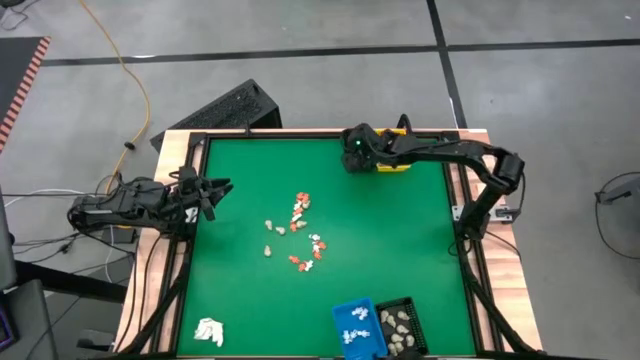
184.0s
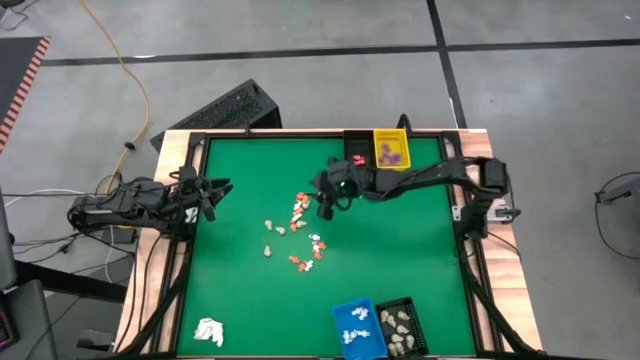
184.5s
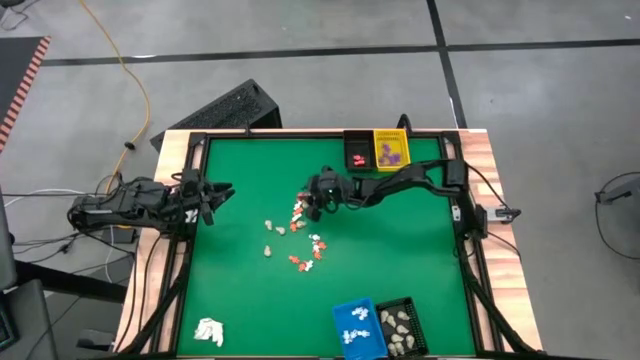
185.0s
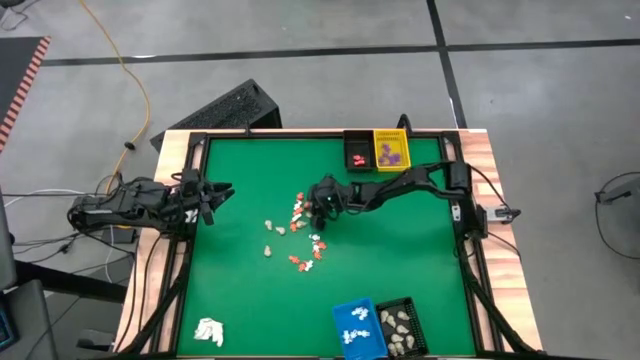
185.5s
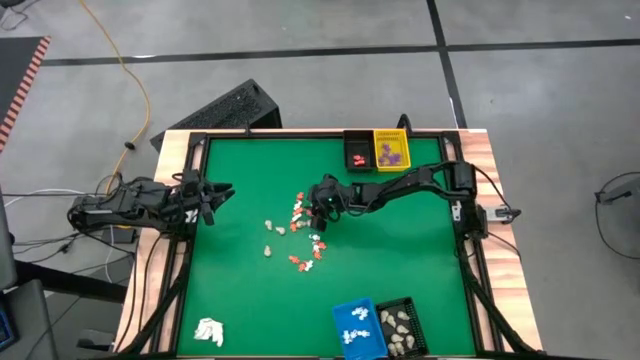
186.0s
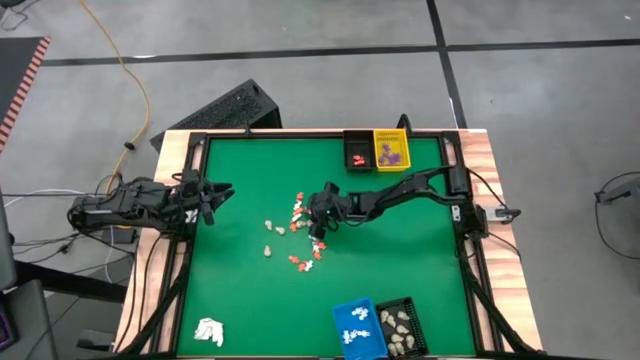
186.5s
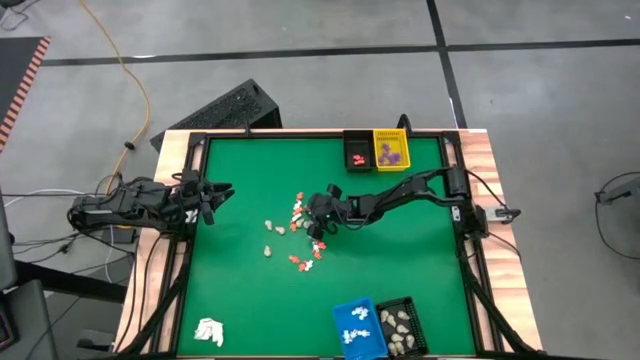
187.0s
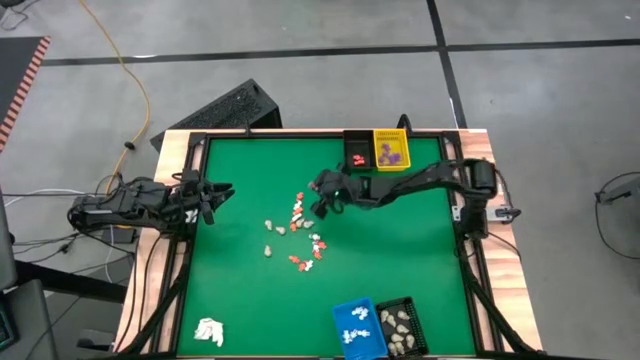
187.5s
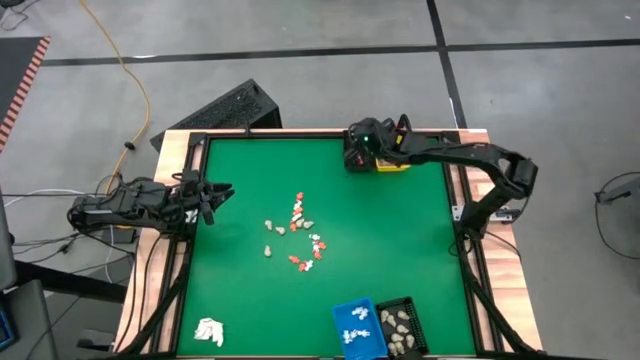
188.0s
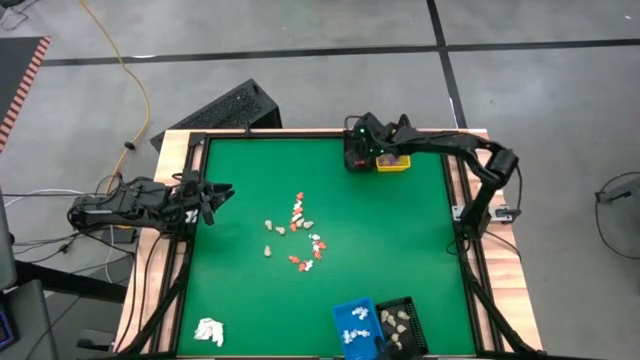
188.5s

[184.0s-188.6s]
Task: Sort Halloween decoration
Put the orange skeleton toy into the top black basket

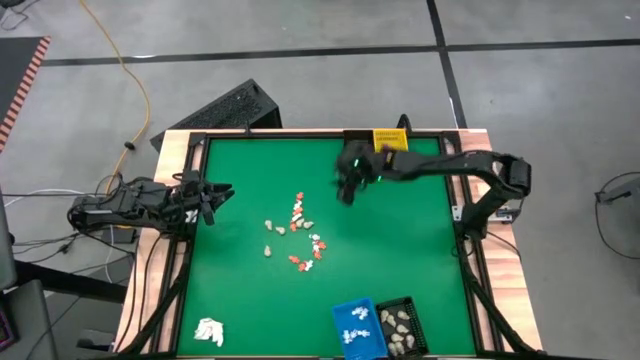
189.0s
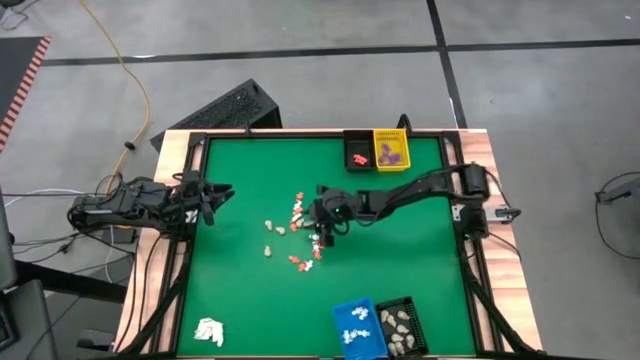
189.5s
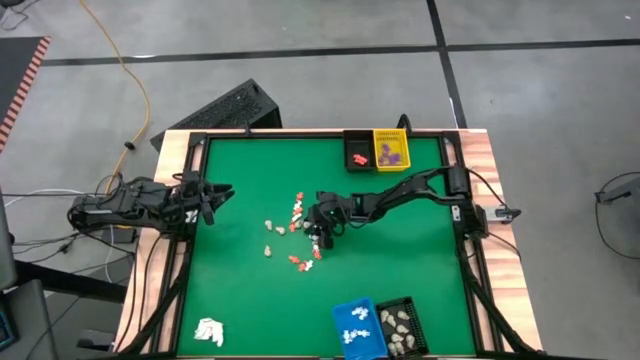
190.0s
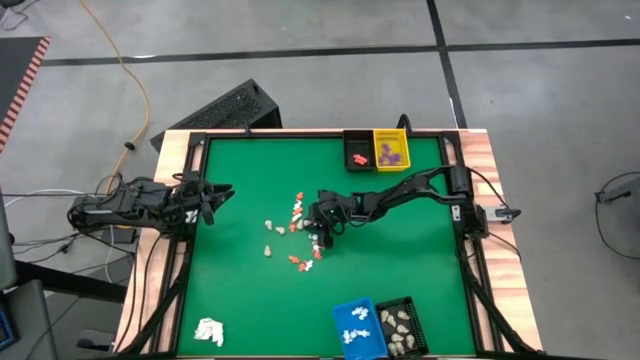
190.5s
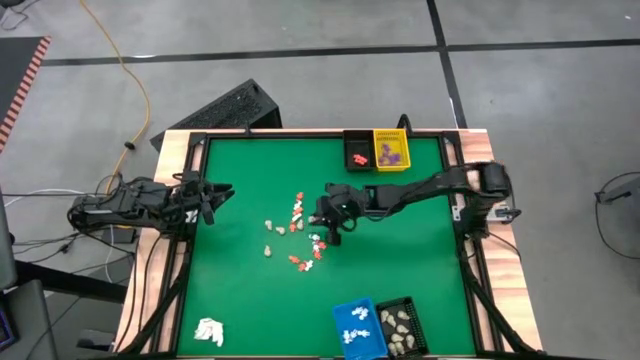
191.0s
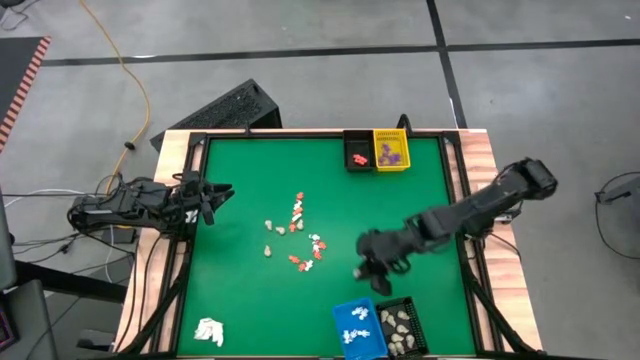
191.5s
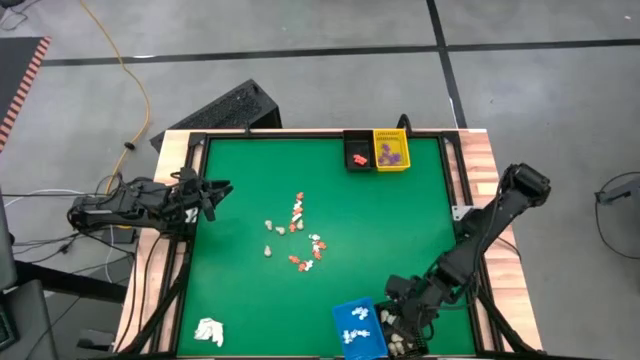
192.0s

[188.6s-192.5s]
Put the white skull toy into the bottom black basket

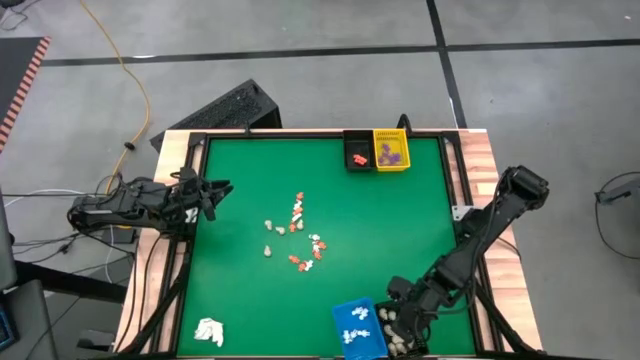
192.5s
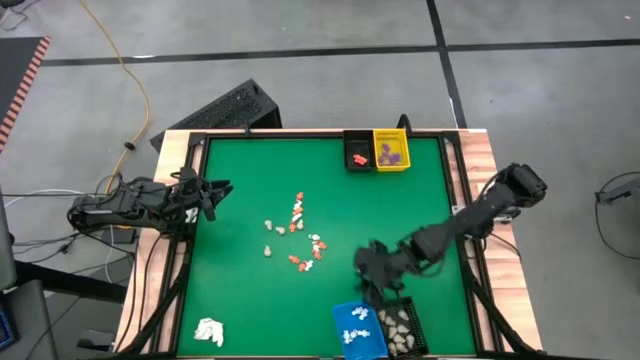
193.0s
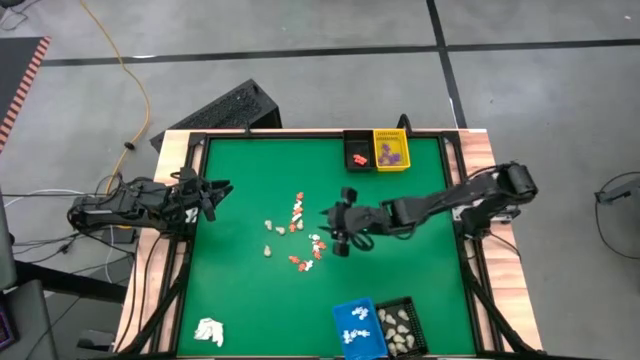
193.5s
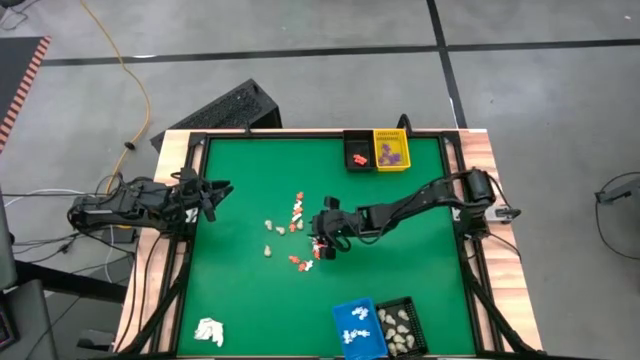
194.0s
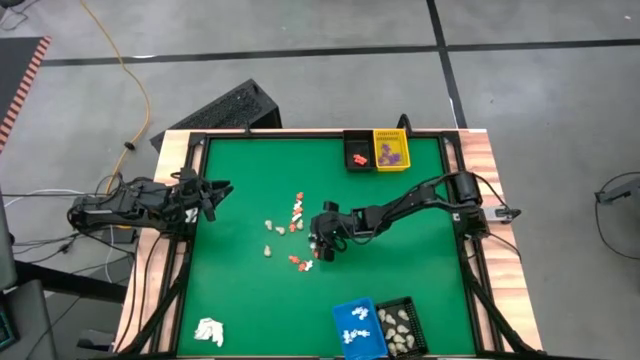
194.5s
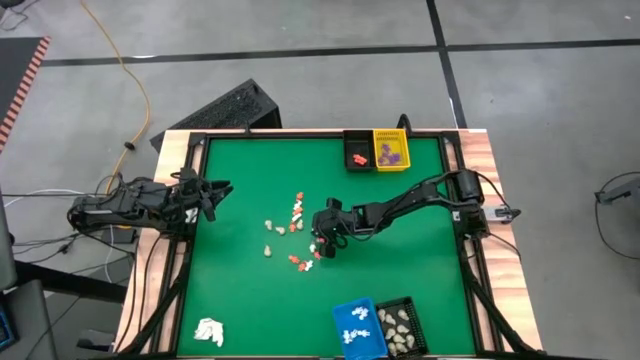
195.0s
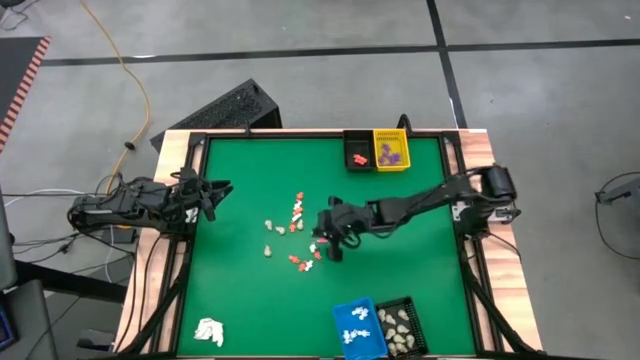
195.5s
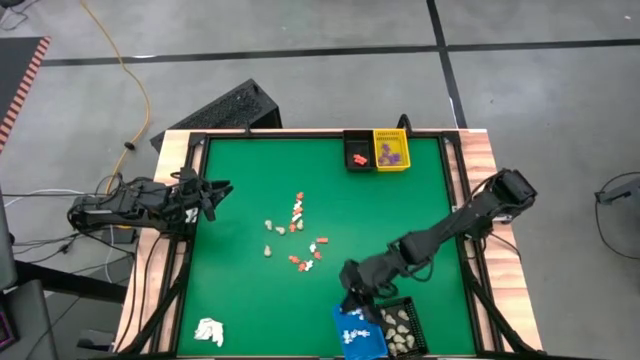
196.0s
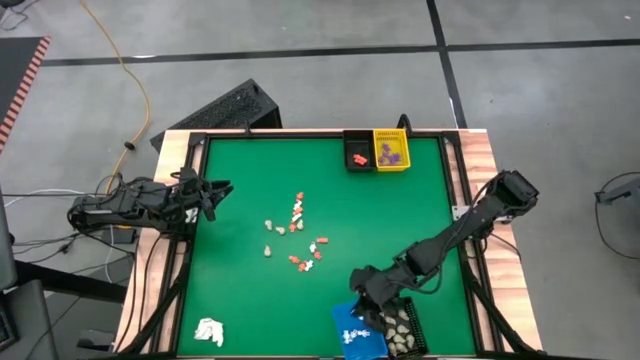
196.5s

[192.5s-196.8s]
Put the white skeleton toy into the blue basket

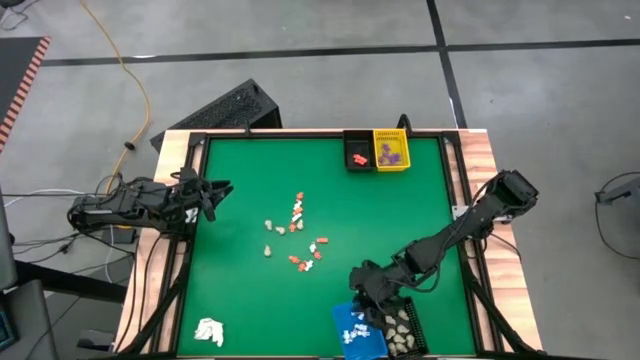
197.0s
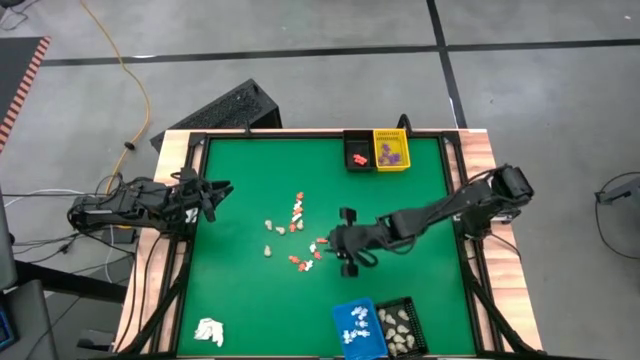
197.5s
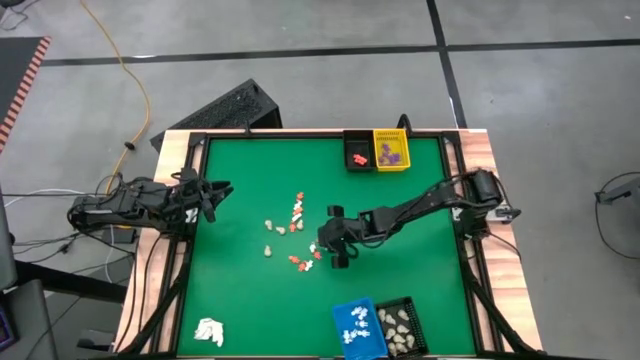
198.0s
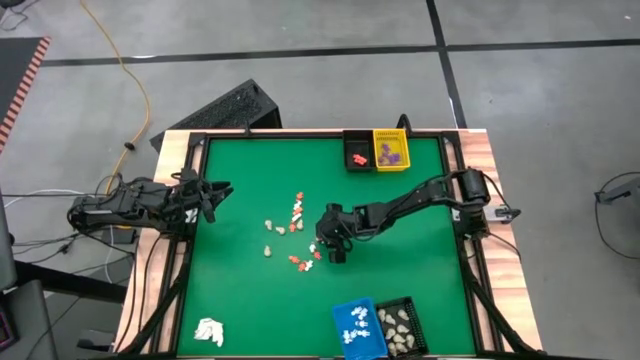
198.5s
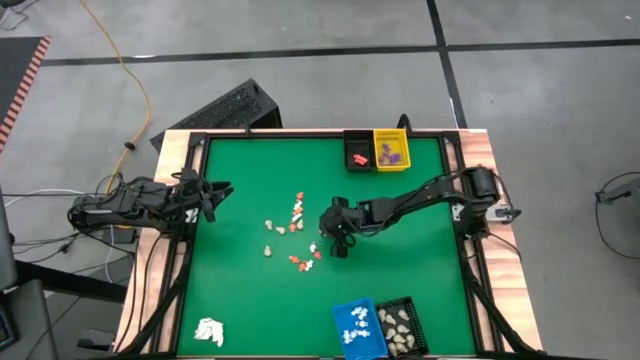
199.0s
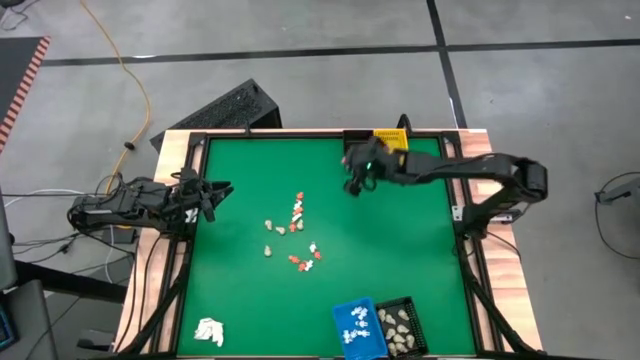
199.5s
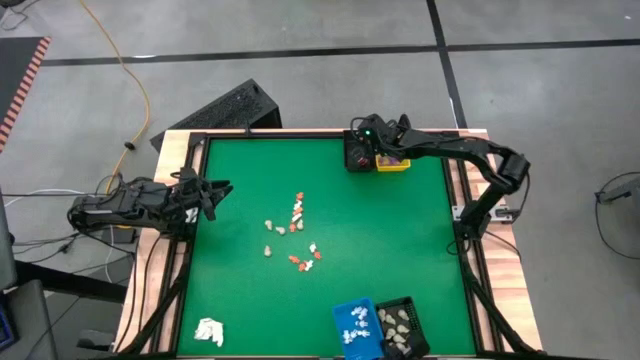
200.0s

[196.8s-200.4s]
Put the orange skeleton toy into the top black basket

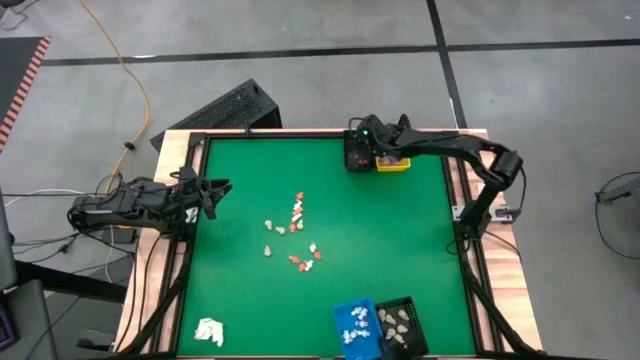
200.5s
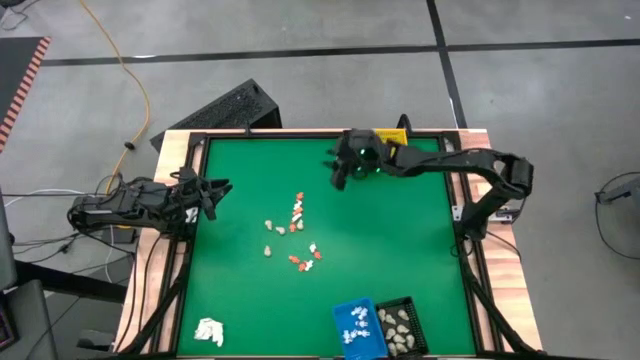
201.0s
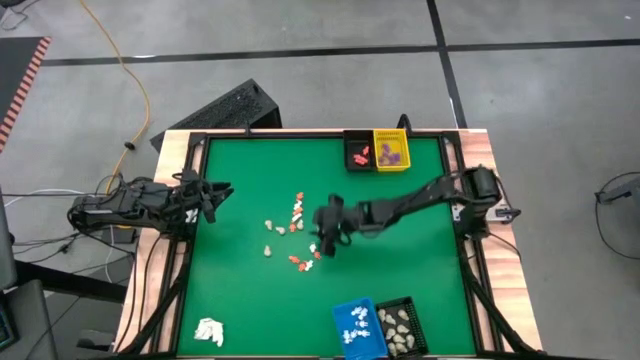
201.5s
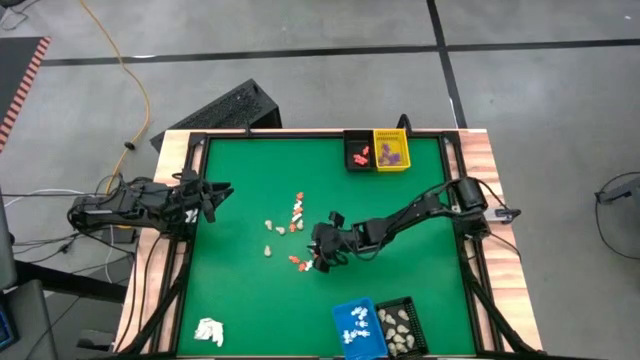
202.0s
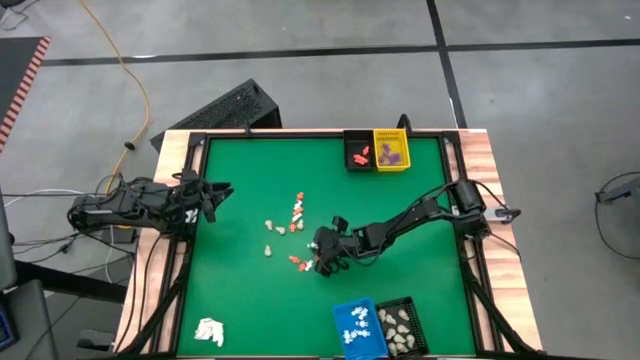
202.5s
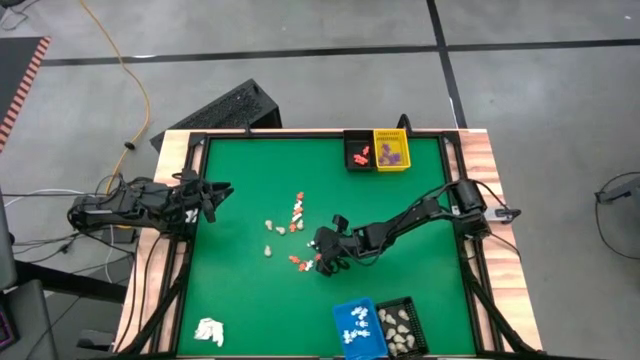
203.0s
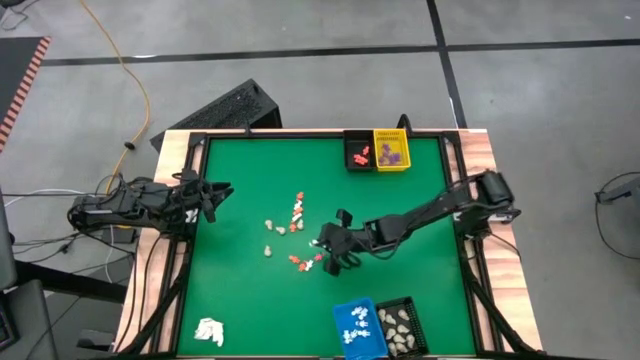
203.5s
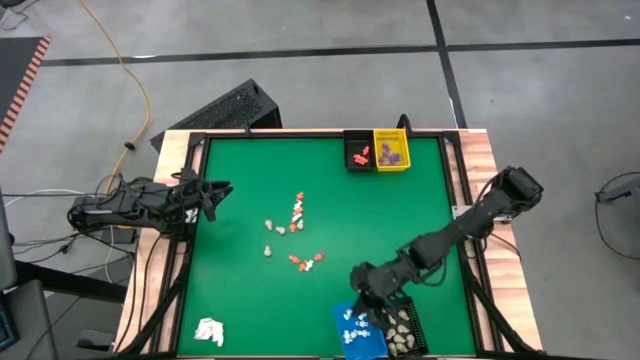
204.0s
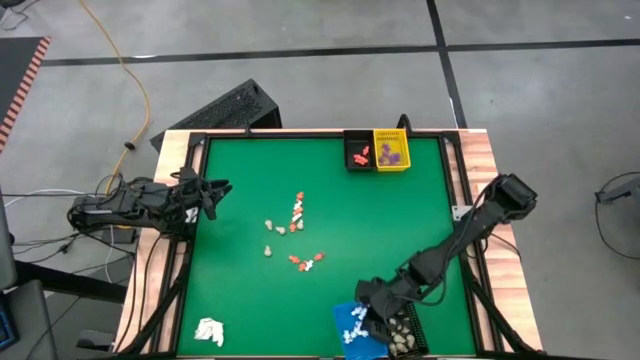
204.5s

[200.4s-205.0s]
Put the white skeleton toy into the blue basket

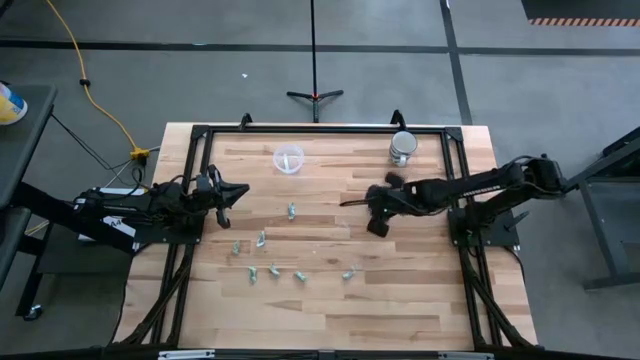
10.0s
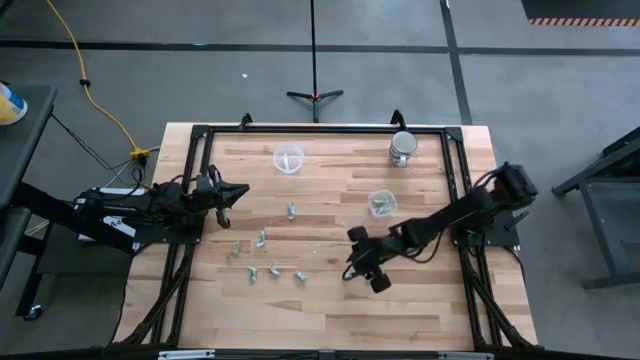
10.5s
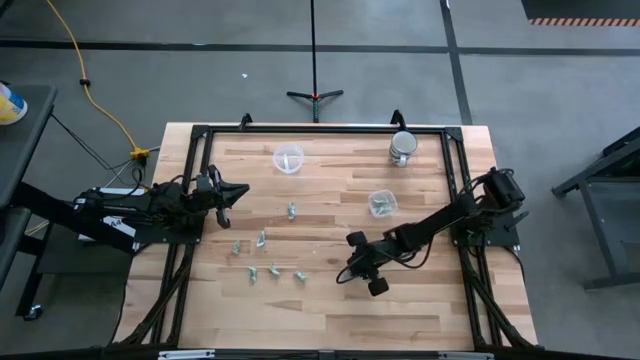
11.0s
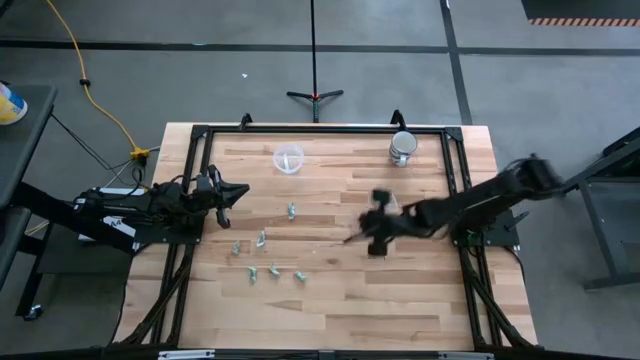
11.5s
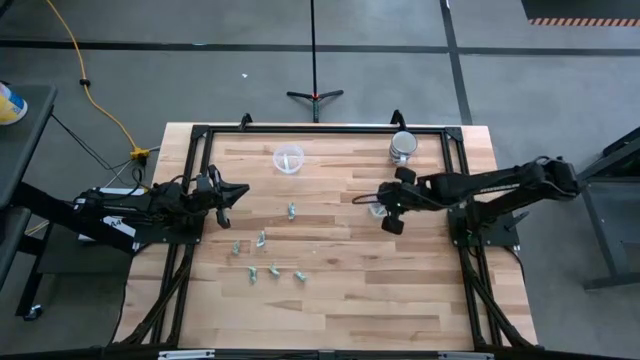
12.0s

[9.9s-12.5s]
Task: Pick and place Stevia / Truvia into bins
Put the stevia packet into the square transparent container
